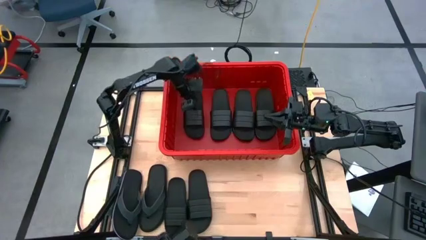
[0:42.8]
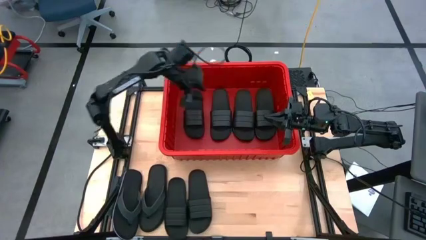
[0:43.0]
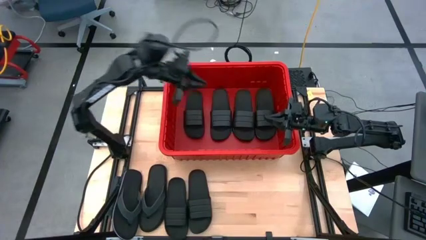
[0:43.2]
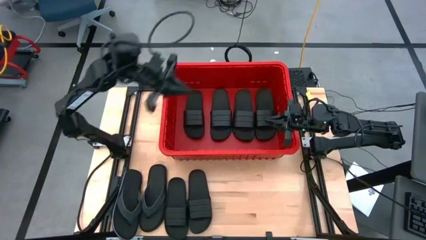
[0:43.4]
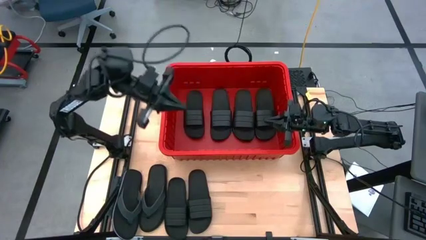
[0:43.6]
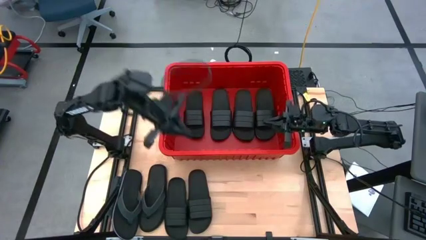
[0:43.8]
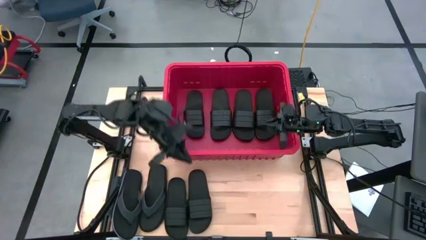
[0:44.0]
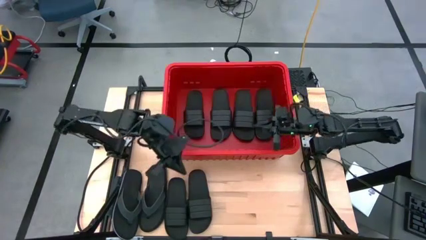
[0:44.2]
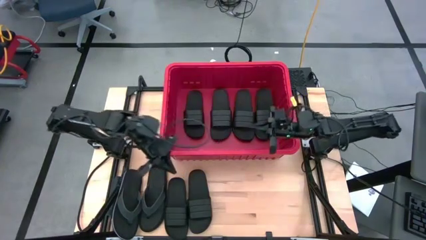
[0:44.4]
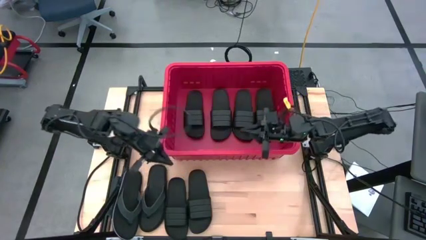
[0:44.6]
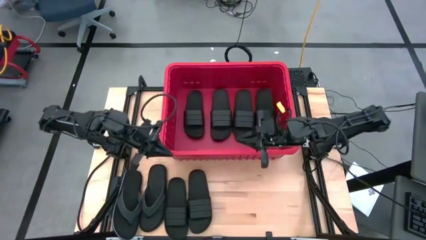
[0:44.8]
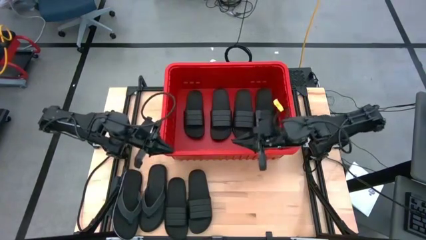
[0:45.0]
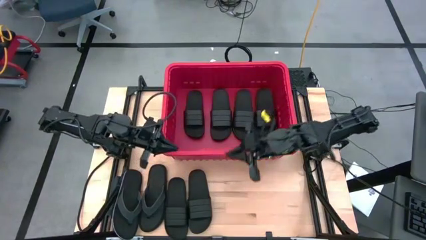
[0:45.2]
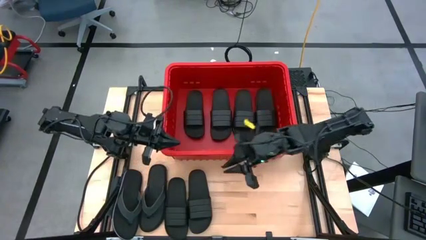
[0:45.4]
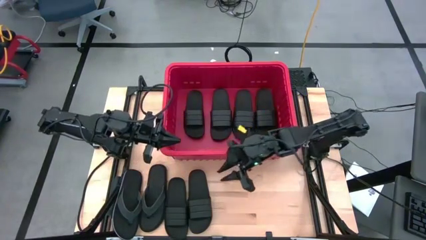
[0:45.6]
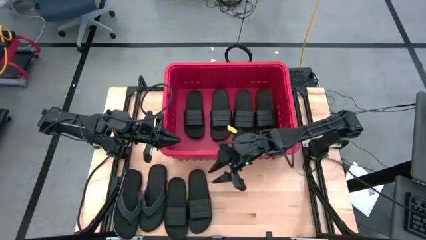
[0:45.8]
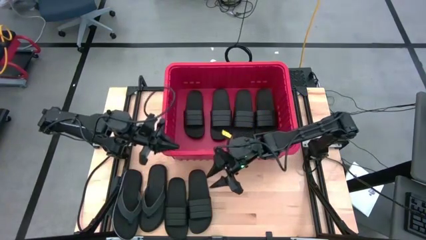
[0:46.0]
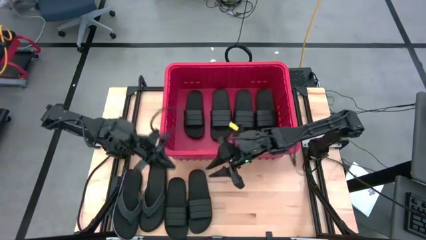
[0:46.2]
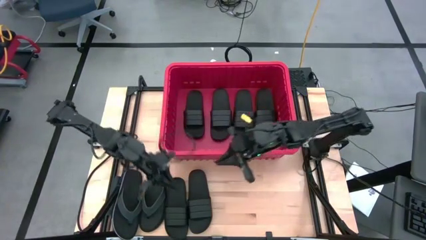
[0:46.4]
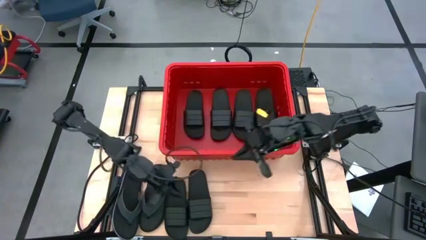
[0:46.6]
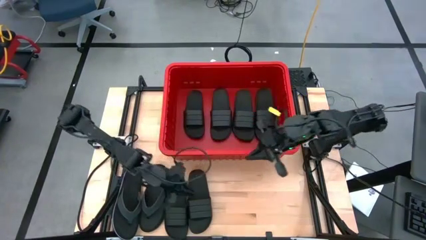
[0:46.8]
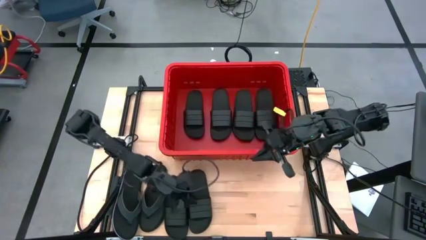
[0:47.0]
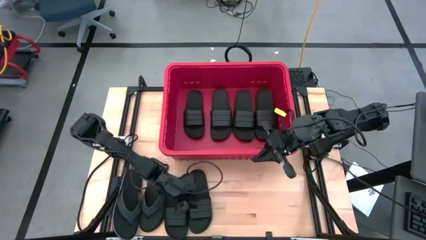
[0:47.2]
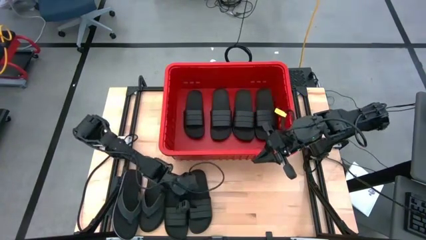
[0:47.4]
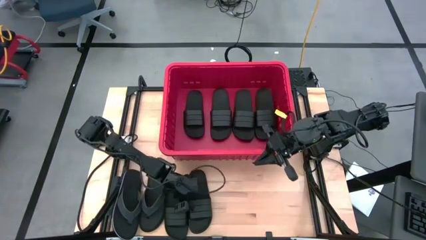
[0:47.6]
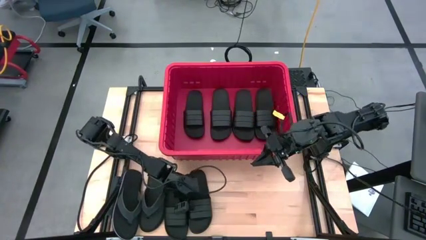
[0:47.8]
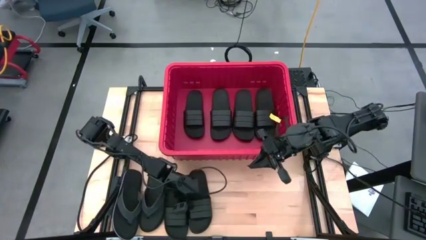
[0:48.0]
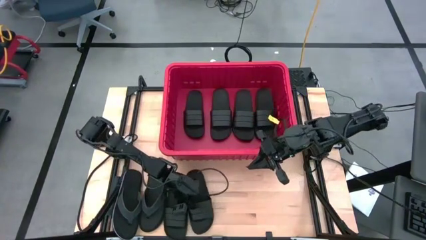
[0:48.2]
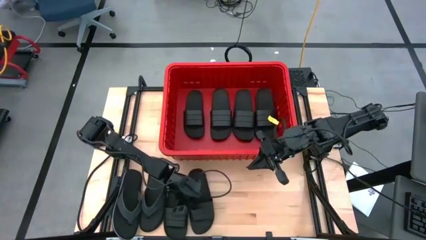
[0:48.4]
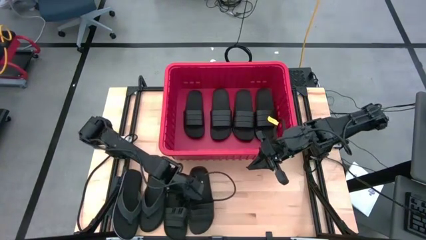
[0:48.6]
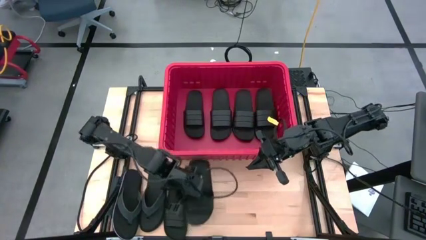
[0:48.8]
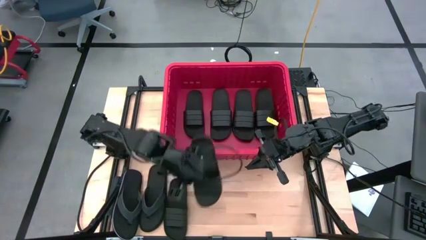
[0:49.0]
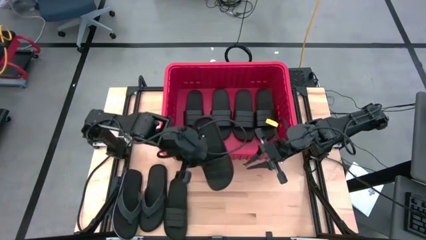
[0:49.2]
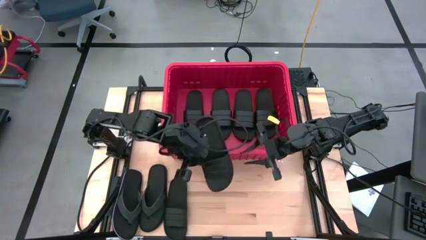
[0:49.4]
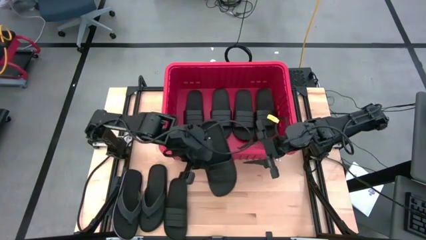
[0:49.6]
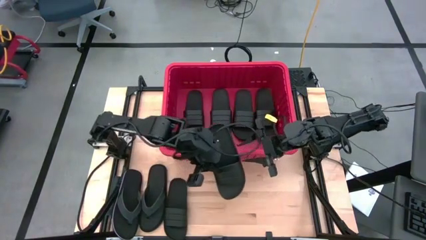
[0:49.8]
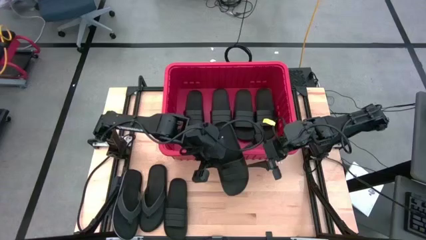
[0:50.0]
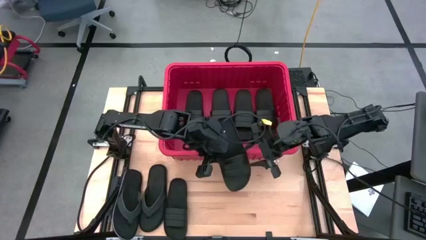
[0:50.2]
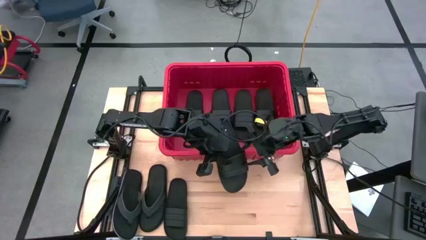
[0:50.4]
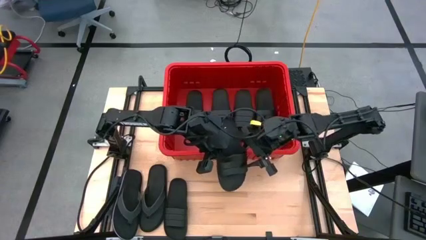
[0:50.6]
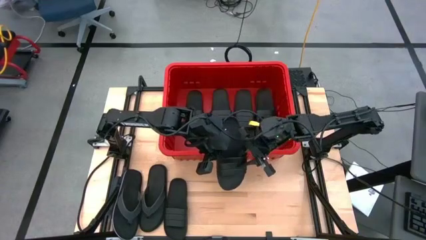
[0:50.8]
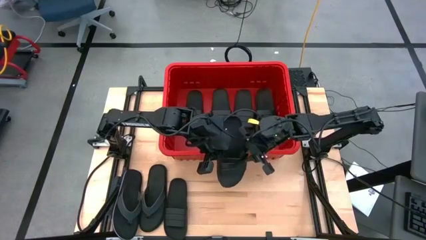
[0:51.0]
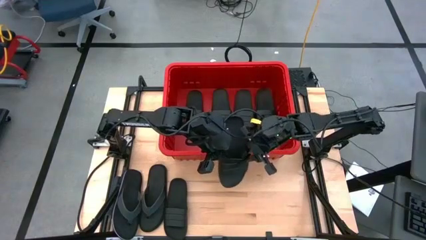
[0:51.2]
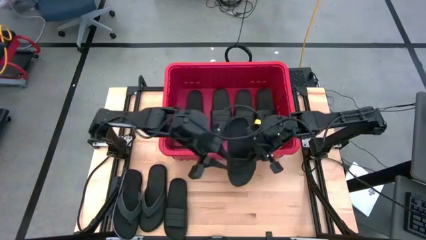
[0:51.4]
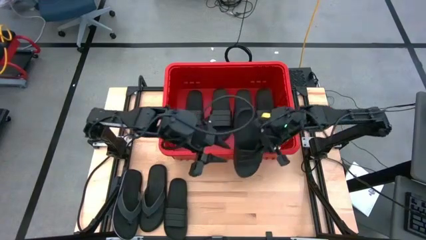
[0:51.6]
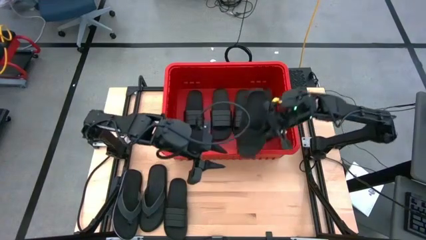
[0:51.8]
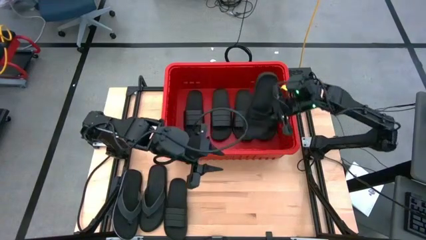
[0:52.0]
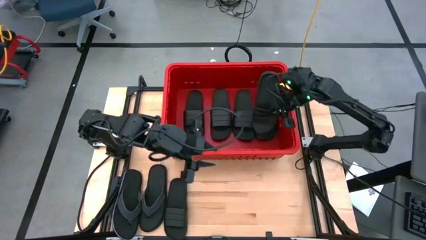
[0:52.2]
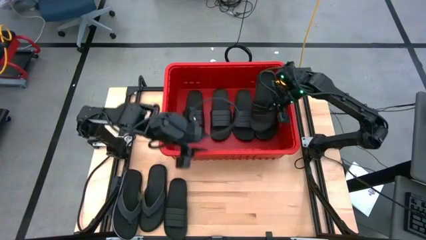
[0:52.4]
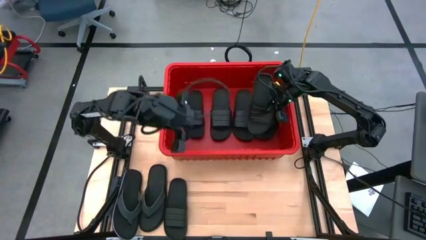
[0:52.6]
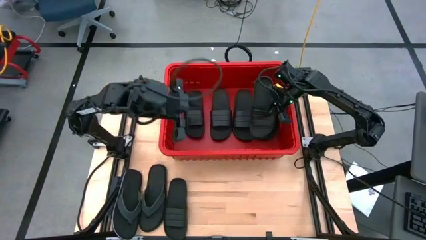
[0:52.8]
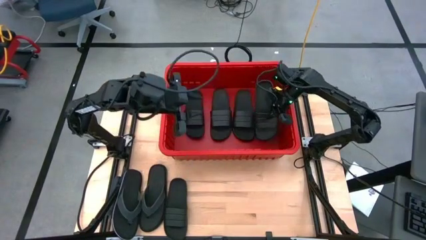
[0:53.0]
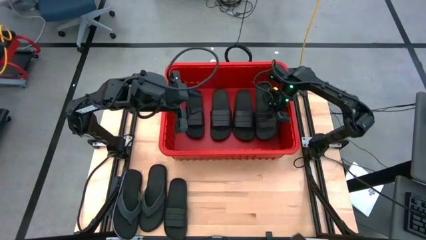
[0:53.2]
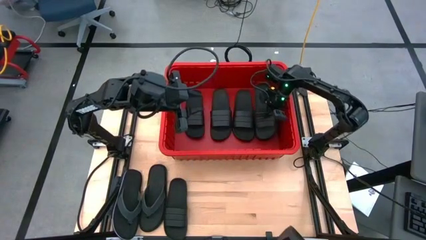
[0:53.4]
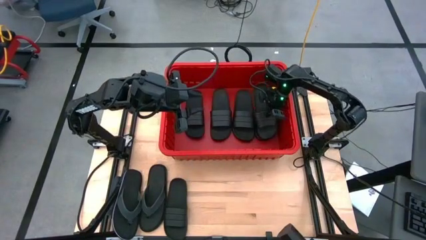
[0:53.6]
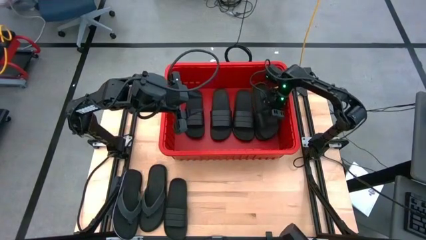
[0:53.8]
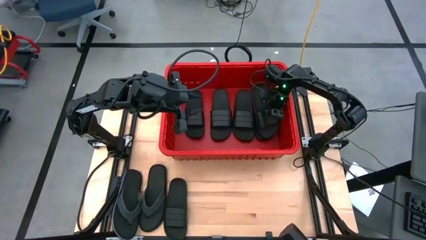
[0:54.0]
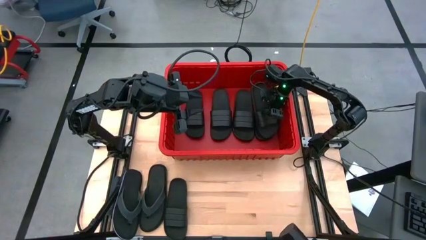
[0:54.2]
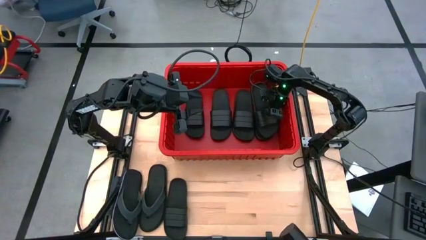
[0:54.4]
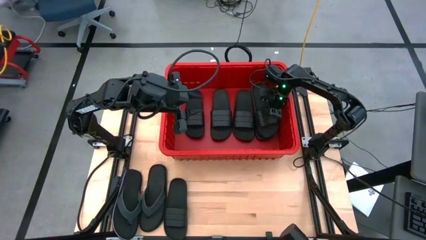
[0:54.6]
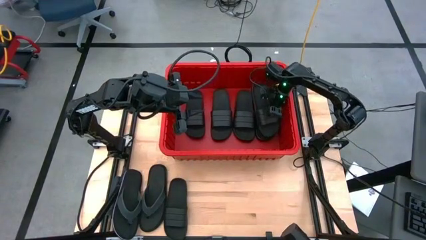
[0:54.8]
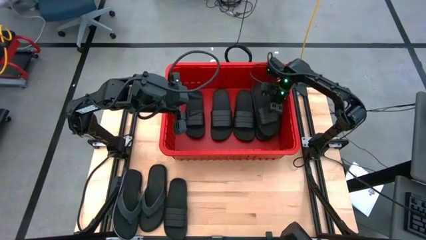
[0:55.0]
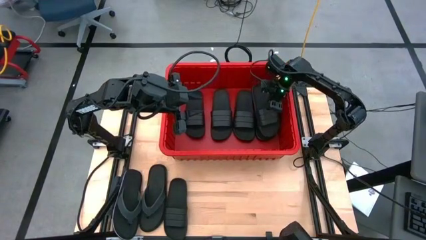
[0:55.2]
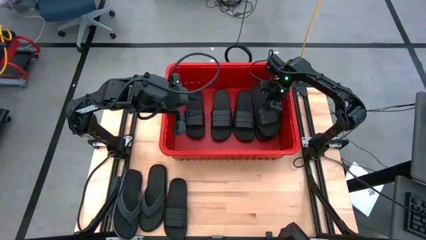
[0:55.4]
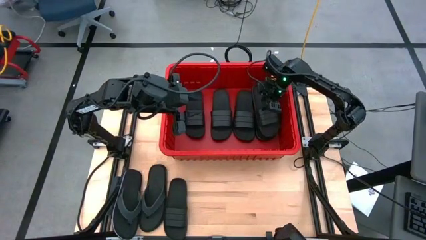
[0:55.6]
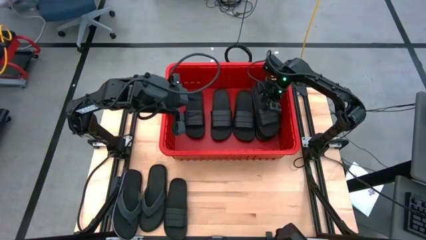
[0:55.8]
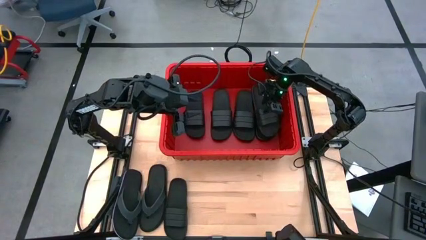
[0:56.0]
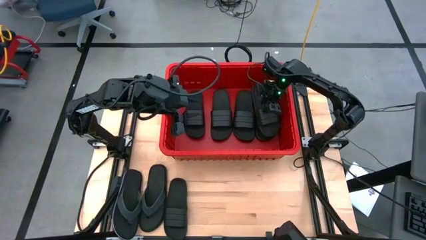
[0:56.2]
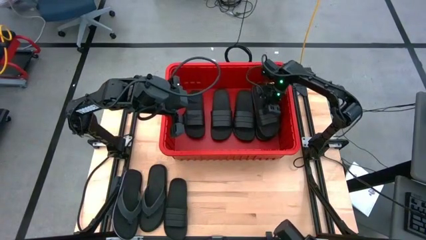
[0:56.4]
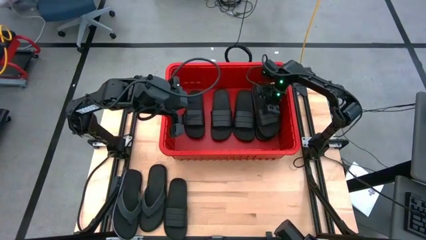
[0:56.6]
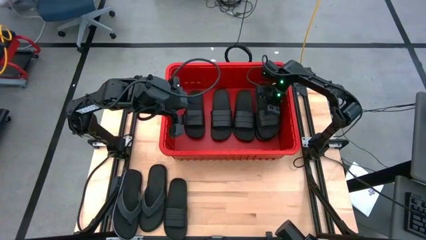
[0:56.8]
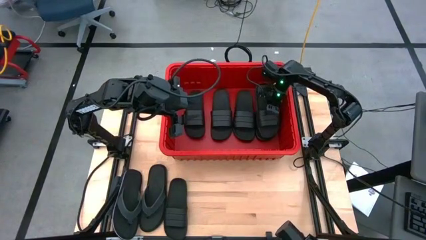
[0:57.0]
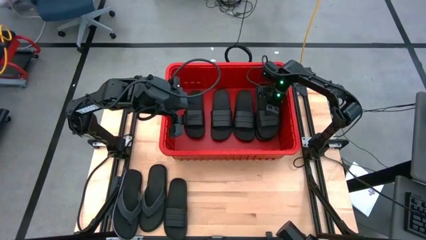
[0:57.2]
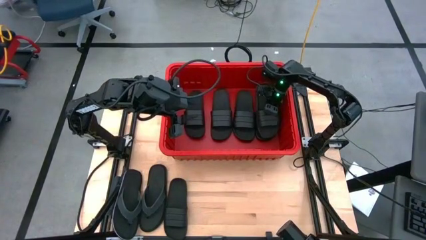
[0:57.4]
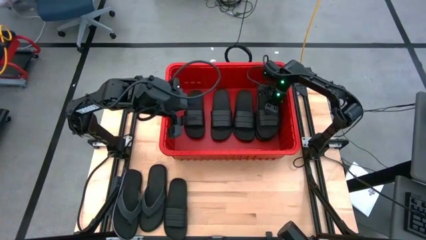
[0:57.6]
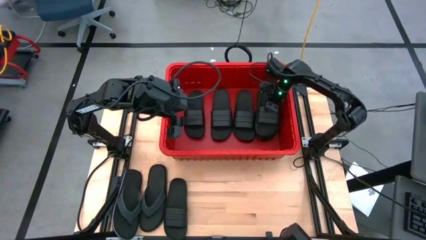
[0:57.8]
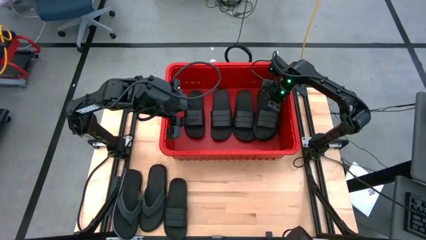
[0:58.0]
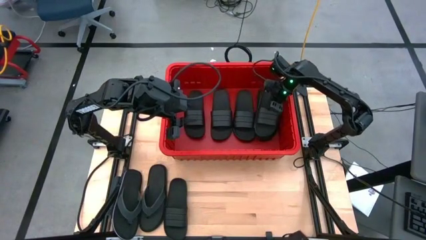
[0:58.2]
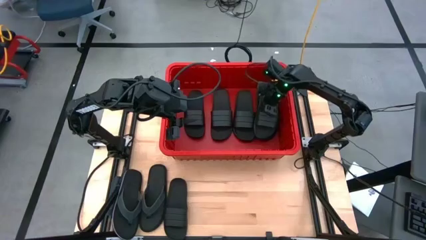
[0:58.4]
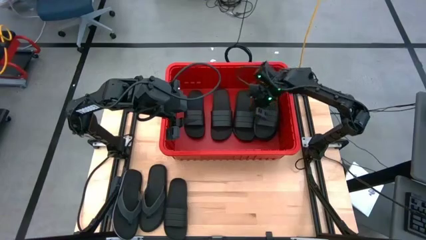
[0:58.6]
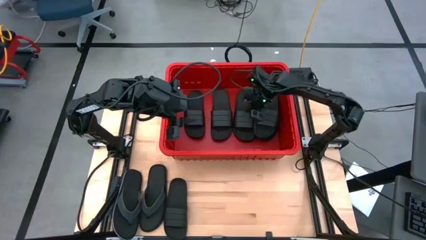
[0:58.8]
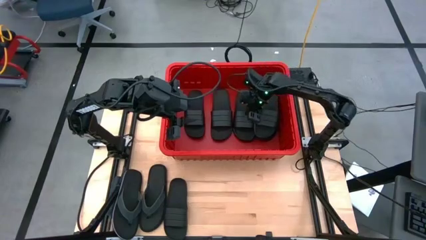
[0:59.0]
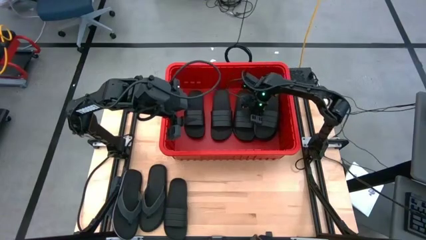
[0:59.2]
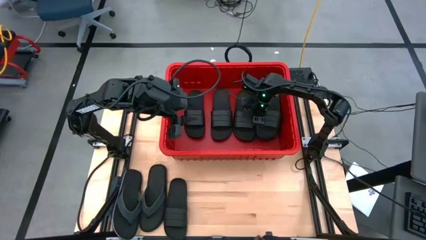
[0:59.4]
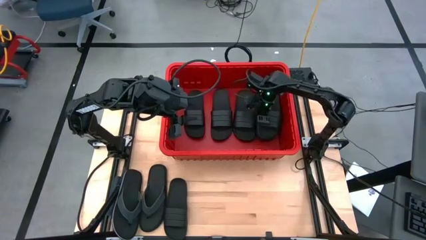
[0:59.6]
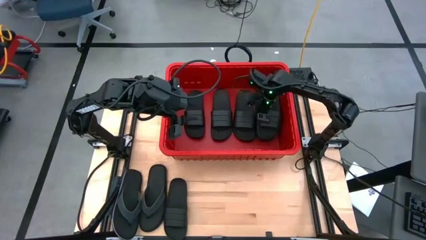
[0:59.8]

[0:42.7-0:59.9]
Task: Pick and place slides into bin
Put the black slide into the red bin
